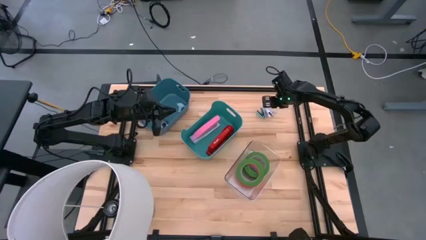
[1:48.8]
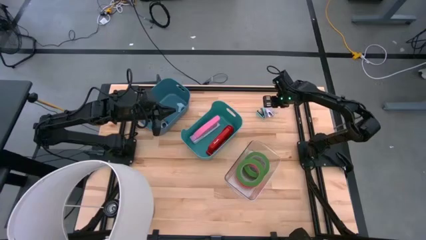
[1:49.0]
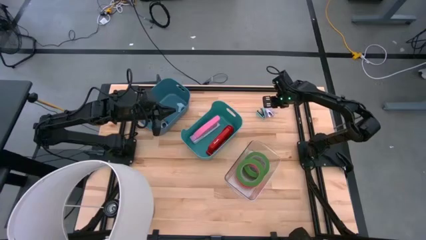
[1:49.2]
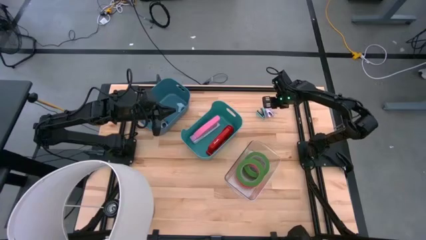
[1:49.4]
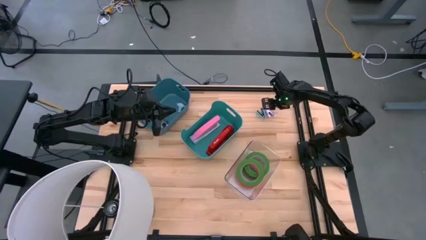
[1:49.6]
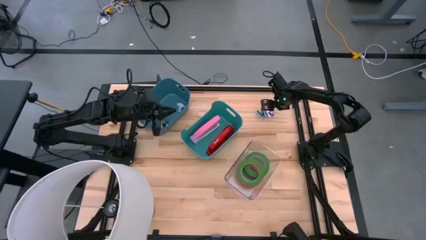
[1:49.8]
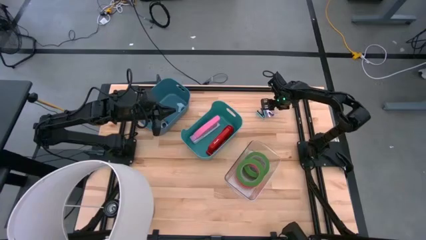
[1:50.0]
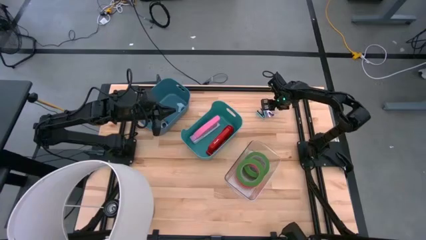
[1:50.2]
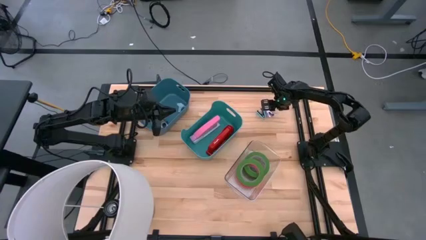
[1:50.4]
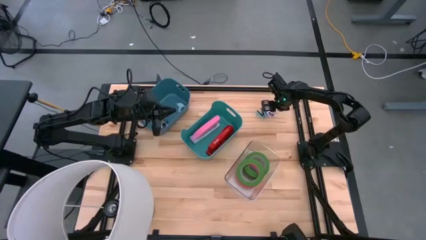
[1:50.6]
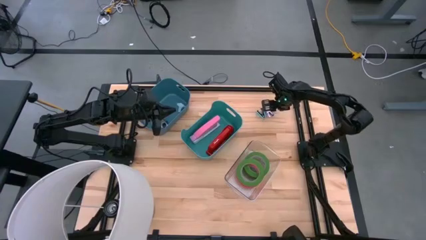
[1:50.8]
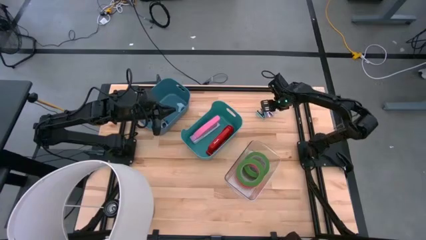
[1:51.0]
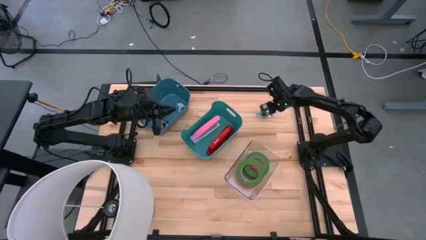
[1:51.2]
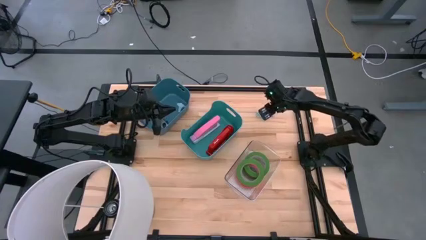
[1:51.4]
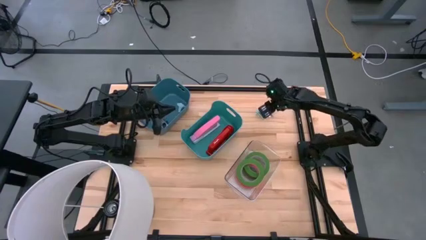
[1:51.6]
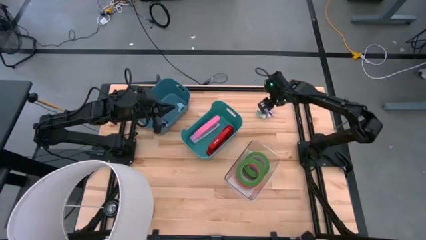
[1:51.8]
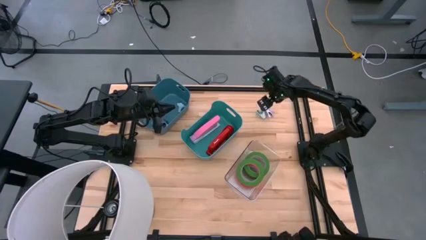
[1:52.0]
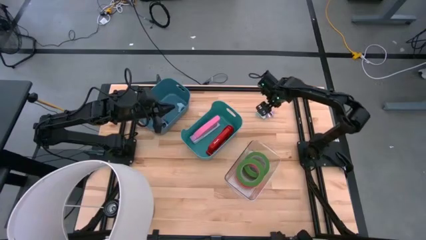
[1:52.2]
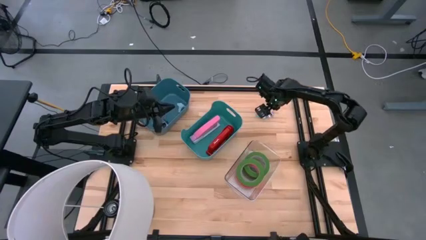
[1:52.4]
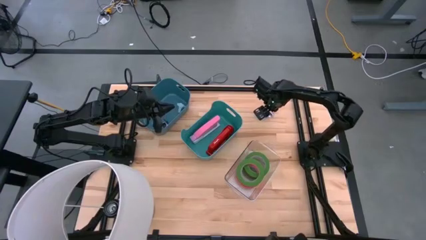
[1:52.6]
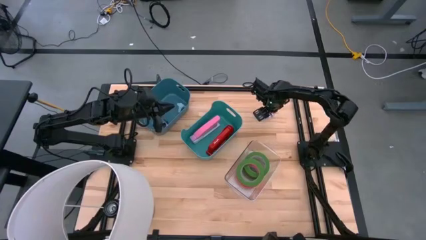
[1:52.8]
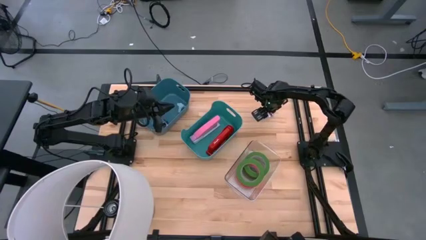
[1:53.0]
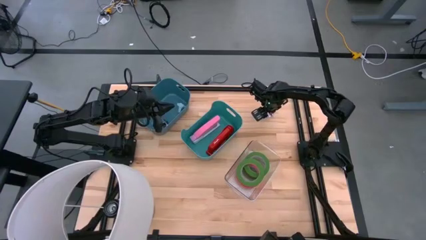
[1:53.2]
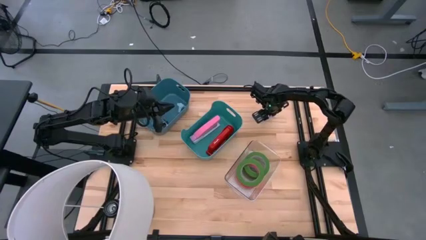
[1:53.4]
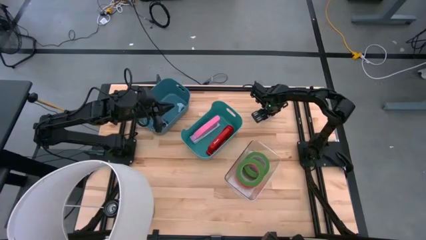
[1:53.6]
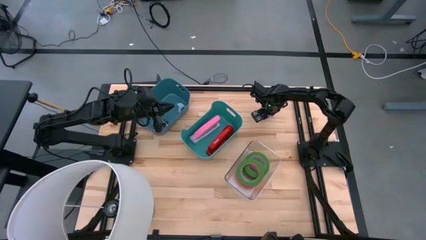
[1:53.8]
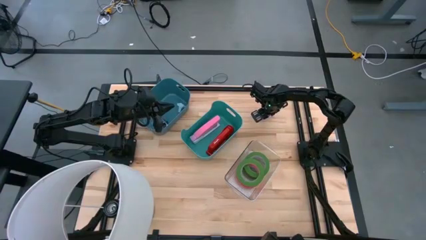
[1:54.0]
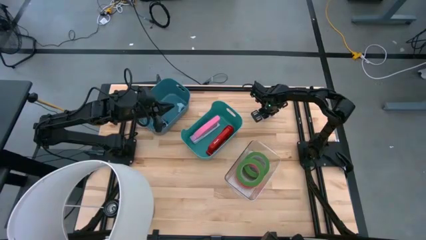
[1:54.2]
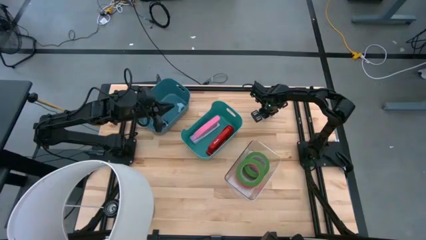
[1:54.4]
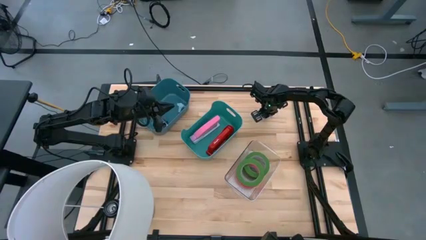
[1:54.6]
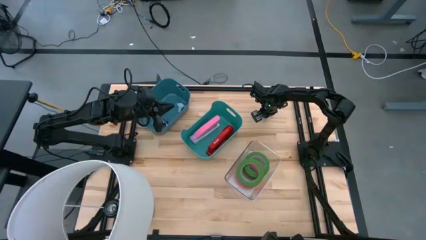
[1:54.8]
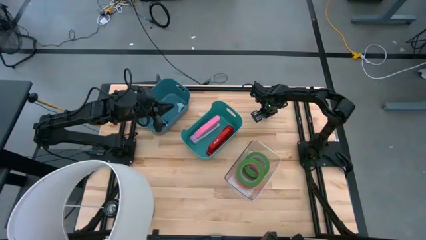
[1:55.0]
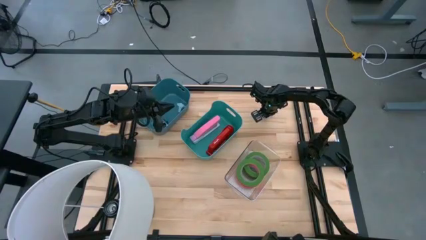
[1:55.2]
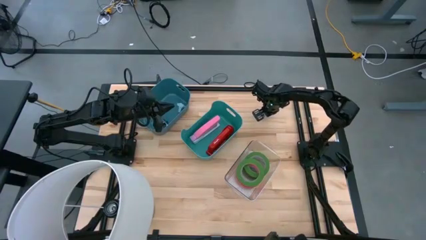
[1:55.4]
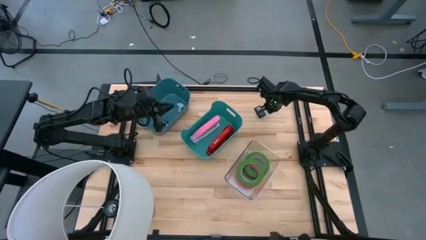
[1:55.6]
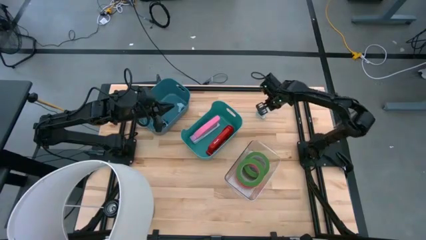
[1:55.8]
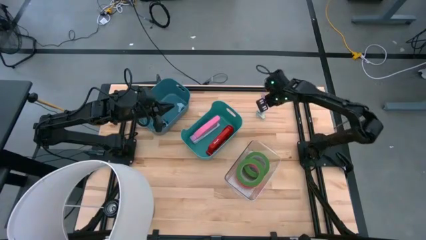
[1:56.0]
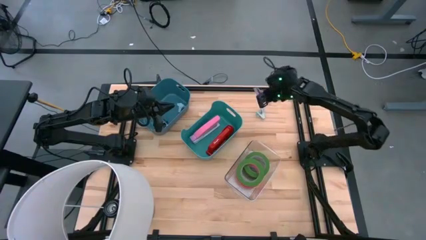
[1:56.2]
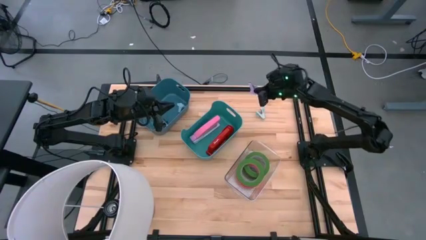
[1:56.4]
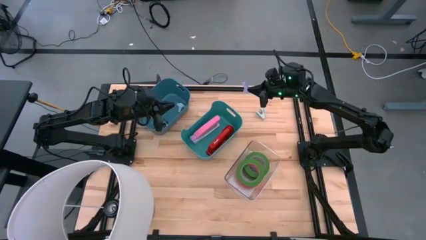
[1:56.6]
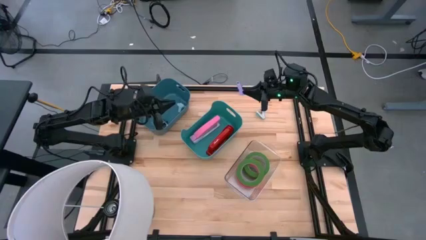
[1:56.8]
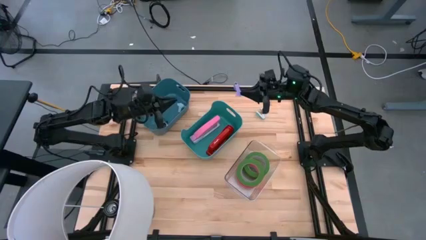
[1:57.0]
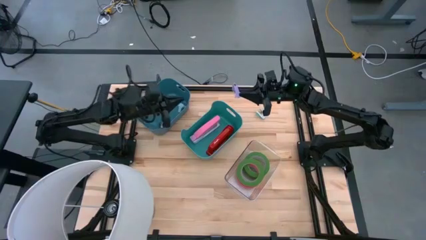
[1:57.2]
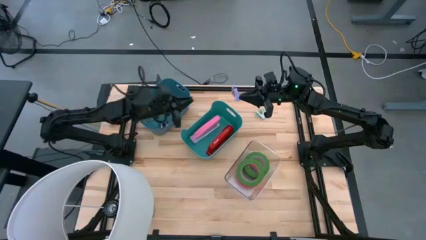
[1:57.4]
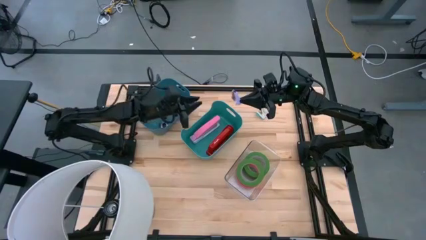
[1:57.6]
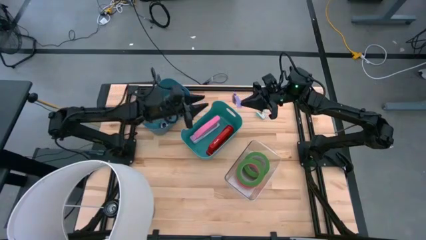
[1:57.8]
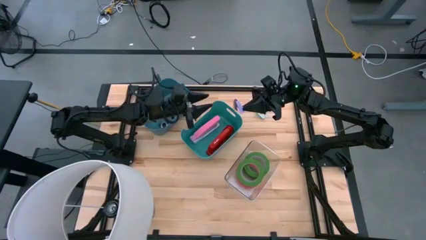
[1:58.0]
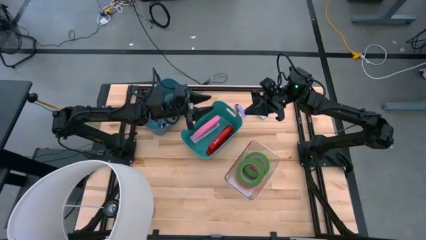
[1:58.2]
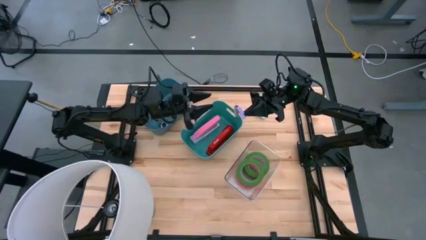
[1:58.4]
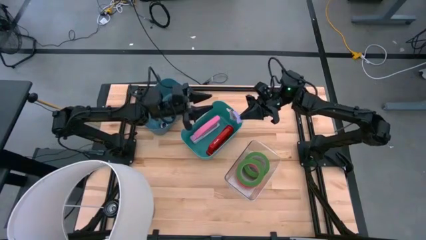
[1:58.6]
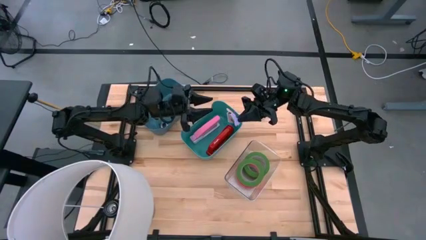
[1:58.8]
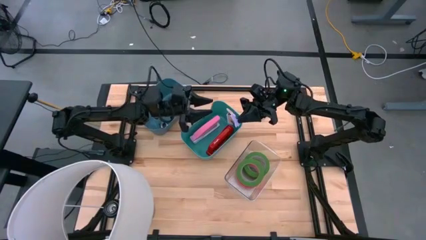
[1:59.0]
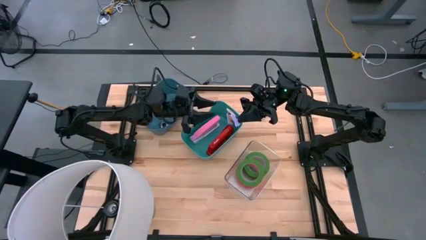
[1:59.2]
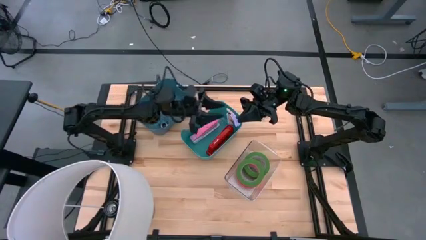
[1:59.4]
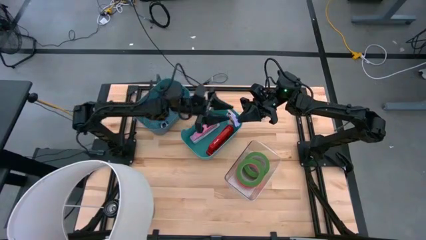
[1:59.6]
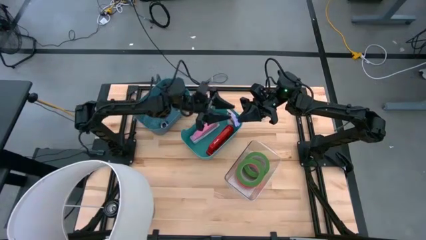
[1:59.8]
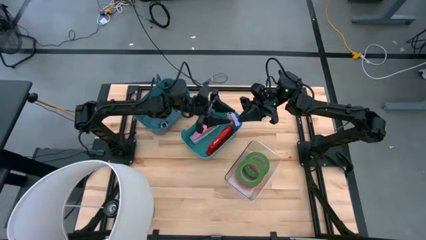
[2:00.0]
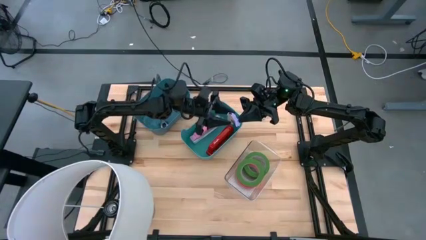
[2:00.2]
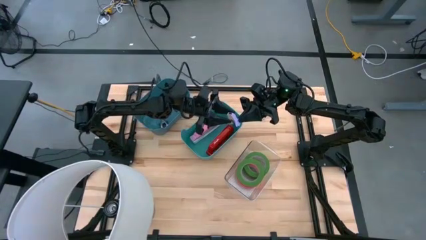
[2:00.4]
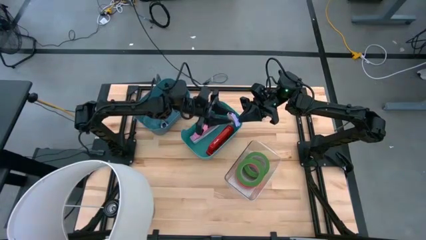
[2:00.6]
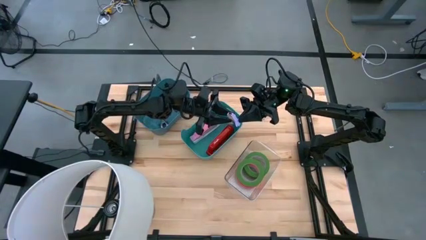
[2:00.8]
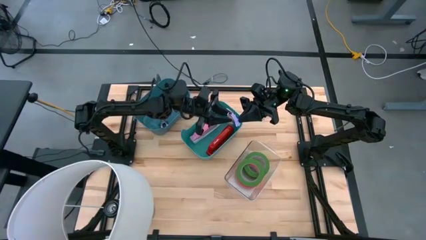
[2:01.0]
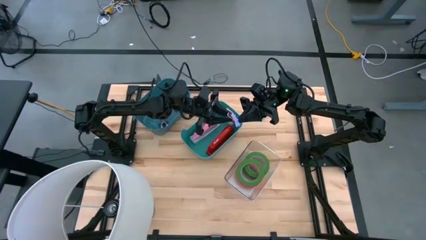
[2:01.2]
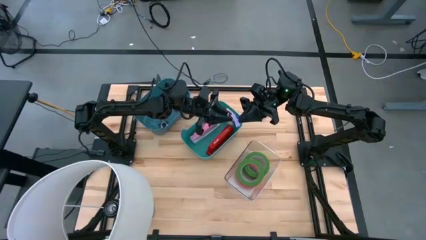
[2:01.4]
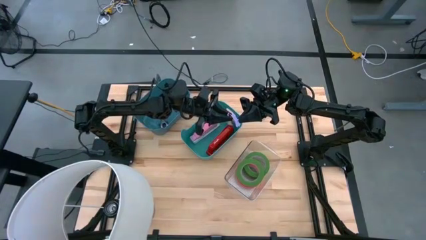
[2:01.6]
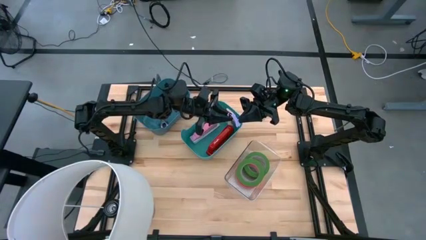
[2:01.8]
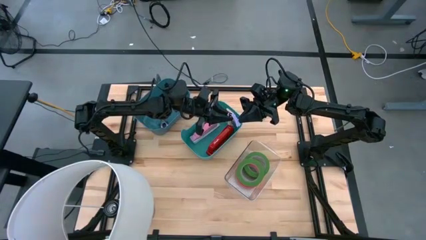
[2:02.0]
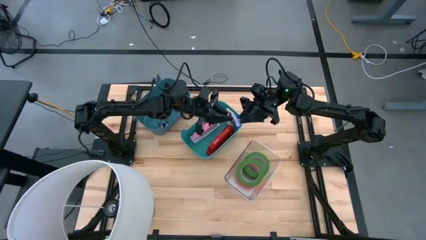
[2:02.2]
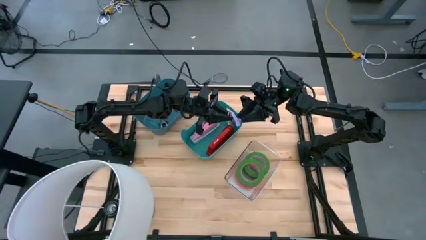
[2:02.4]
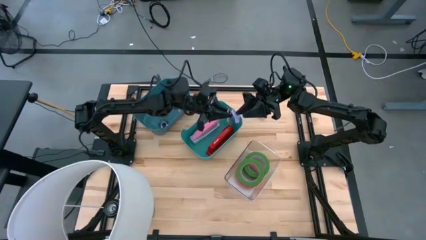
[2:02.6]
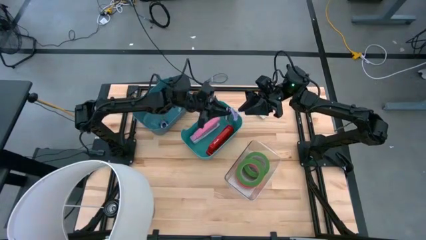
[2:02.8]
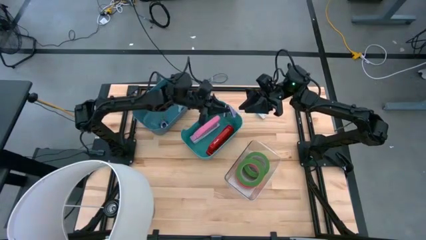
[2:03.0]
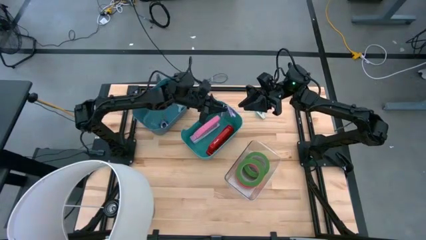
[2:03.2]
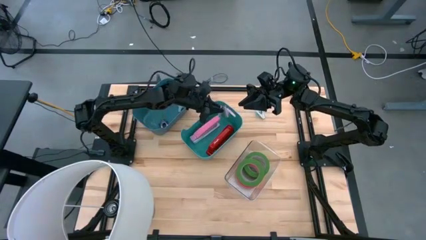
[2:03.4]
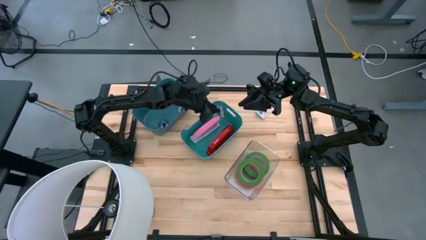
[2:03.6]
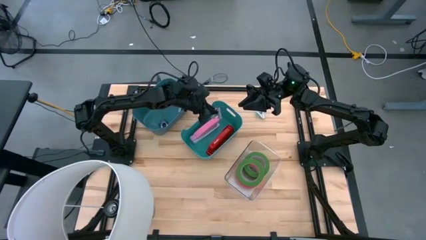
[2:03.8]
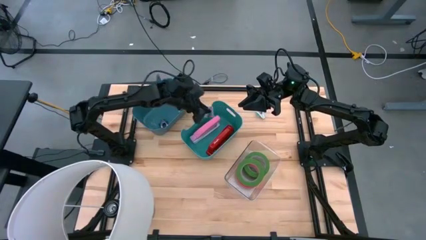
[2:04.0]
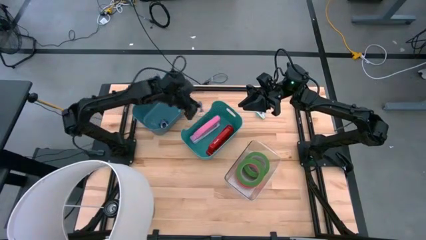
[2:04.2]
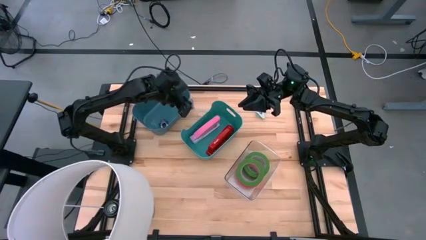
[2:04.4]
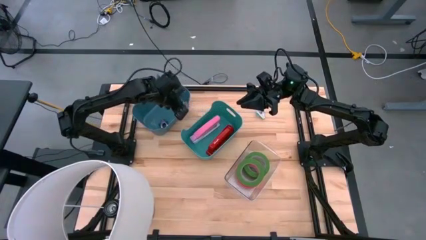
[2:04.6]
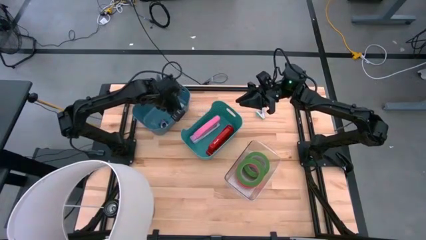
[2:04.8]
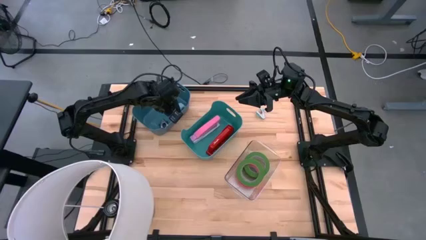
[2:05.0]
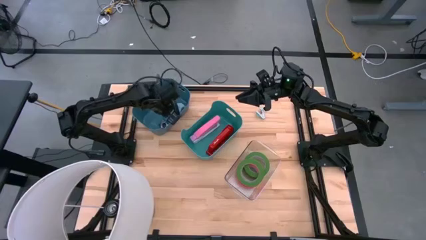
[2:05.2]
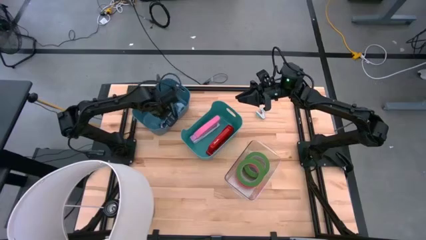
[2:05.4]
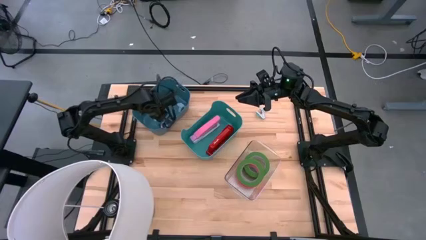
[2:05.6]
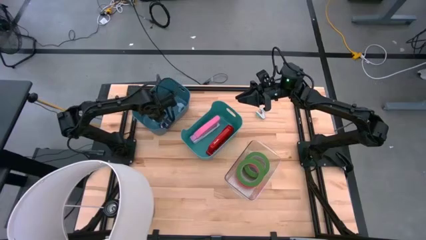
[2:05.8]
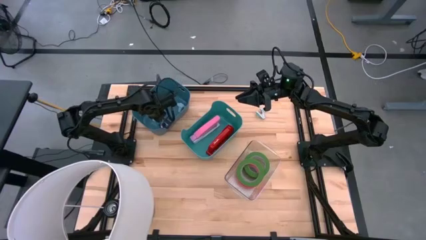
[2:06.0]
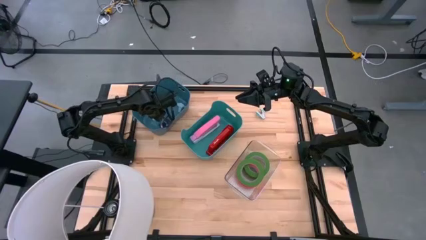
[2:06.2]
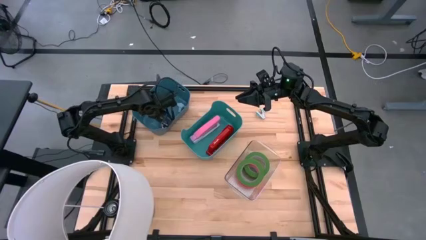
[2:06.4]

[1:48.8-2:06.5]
Task: Pick and place Stapler, Stapler remover, tape
Put the violet staple remover into the blue bin
